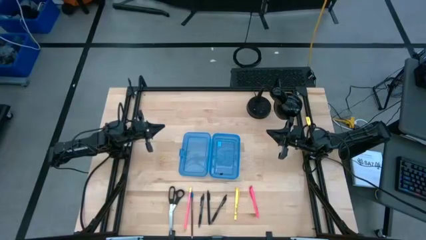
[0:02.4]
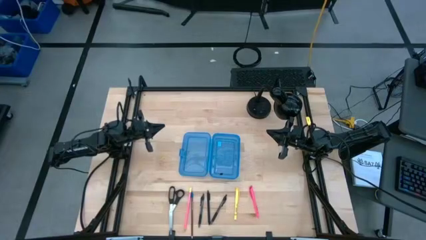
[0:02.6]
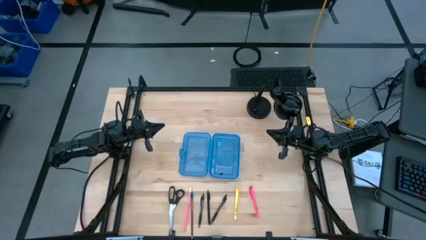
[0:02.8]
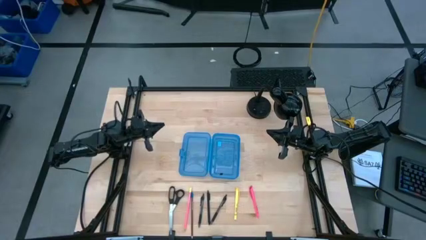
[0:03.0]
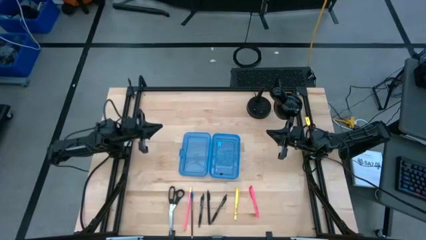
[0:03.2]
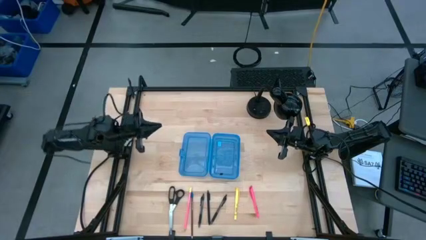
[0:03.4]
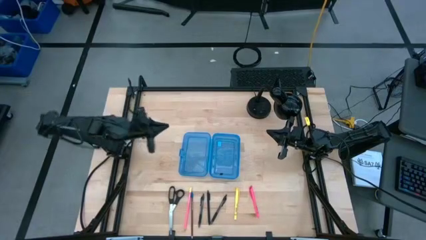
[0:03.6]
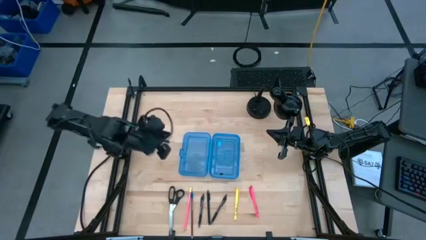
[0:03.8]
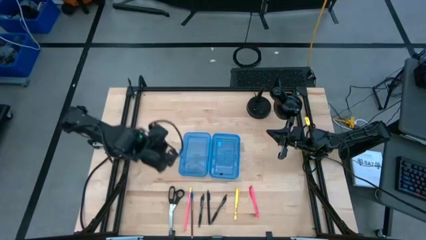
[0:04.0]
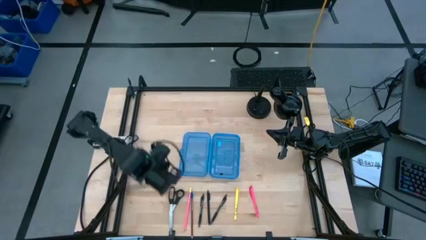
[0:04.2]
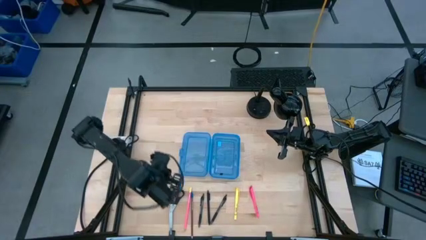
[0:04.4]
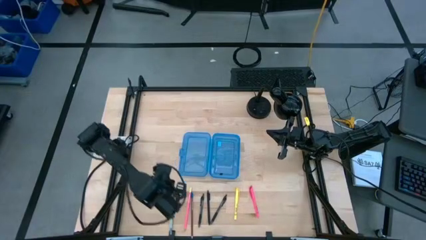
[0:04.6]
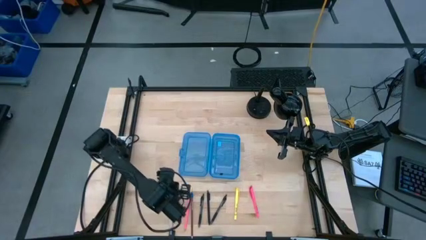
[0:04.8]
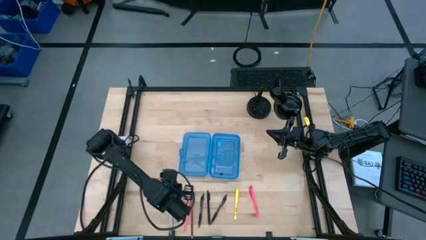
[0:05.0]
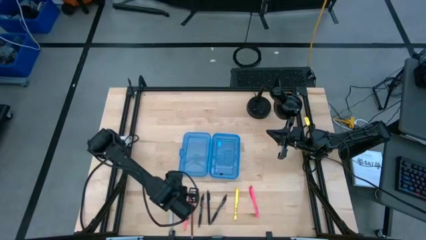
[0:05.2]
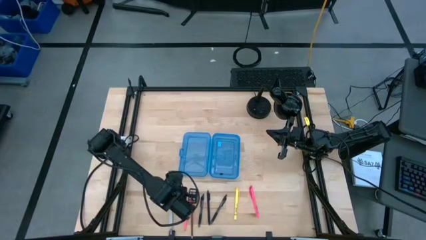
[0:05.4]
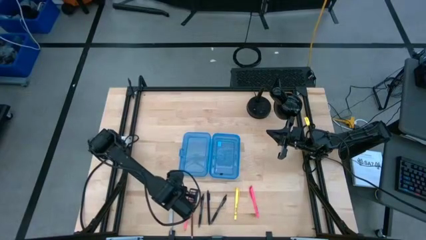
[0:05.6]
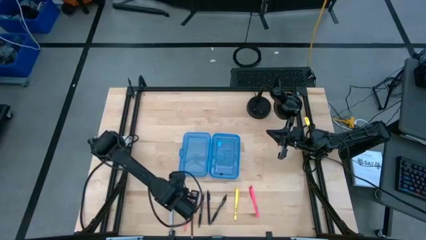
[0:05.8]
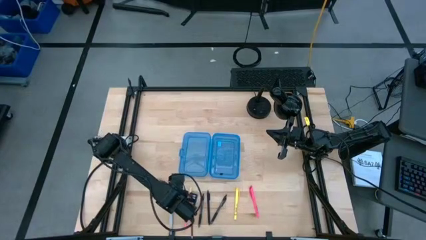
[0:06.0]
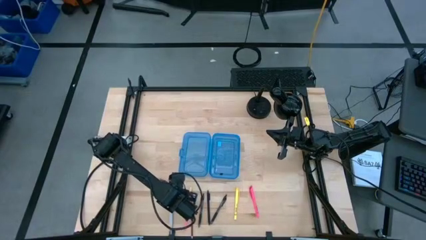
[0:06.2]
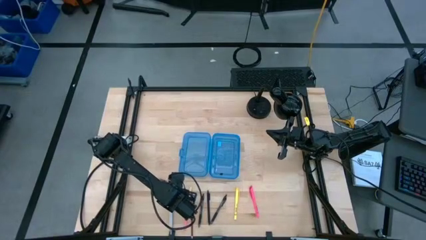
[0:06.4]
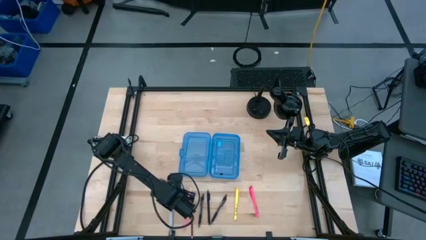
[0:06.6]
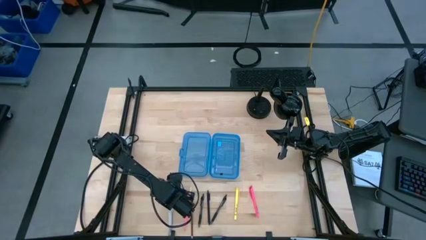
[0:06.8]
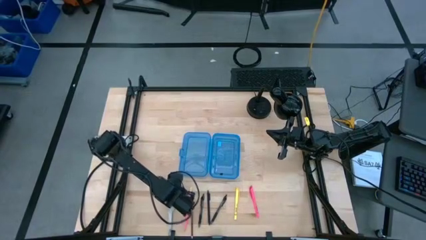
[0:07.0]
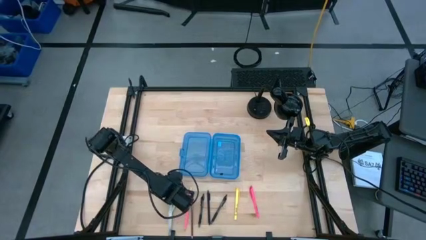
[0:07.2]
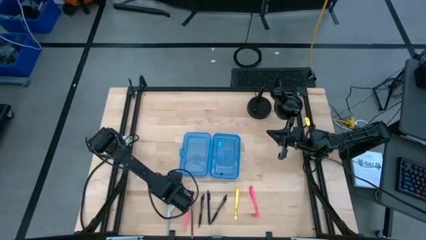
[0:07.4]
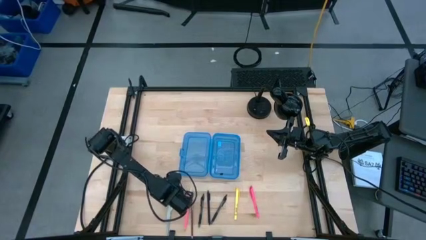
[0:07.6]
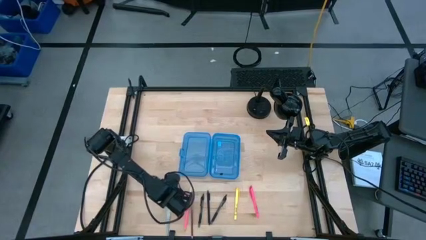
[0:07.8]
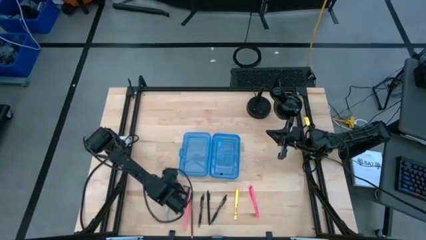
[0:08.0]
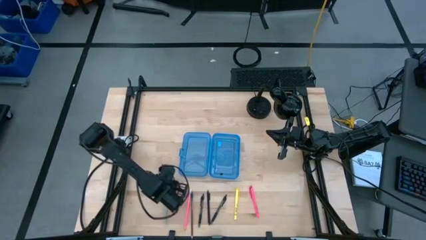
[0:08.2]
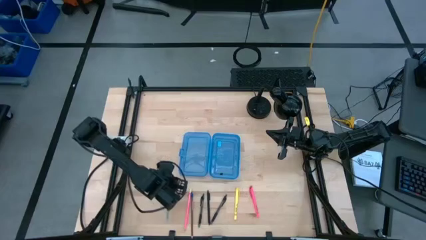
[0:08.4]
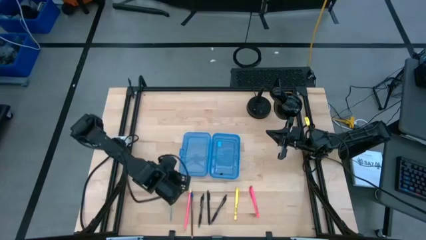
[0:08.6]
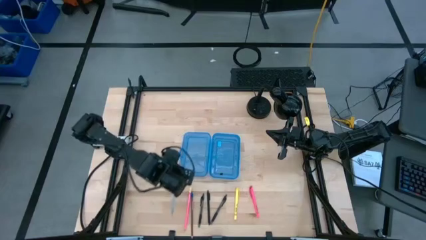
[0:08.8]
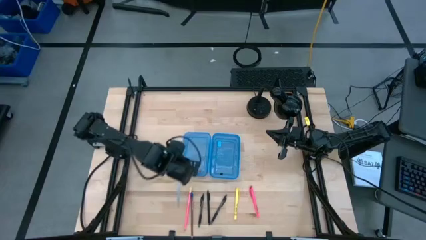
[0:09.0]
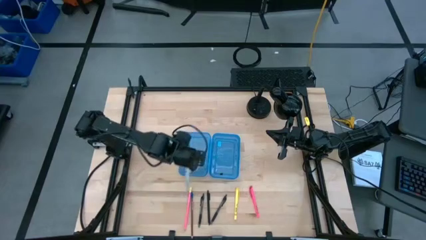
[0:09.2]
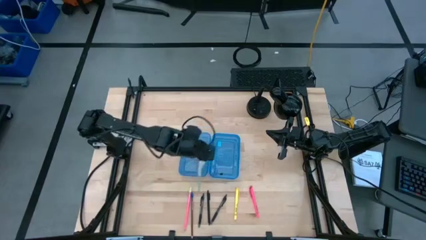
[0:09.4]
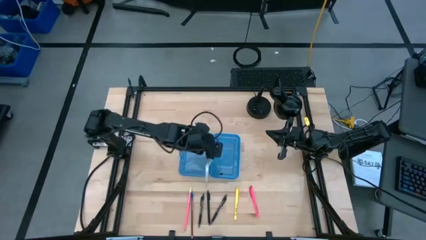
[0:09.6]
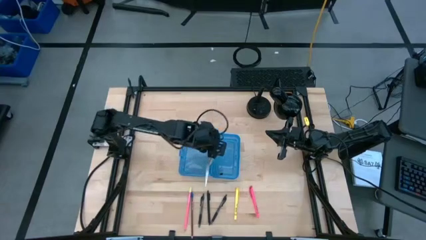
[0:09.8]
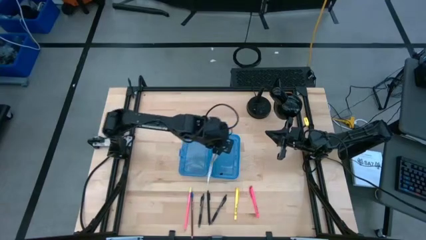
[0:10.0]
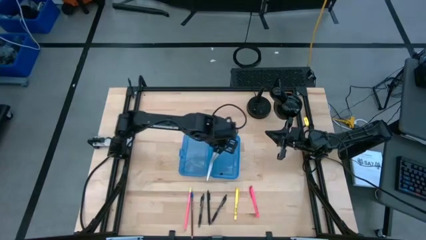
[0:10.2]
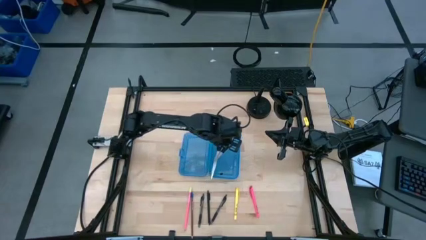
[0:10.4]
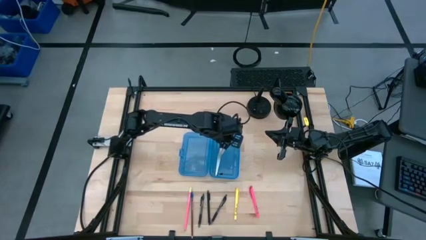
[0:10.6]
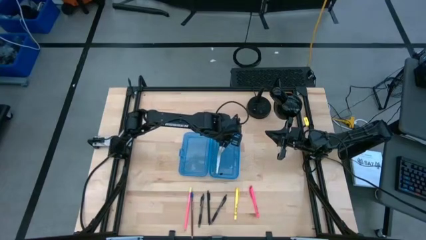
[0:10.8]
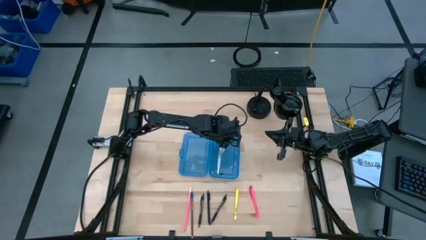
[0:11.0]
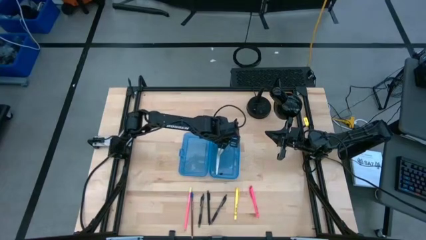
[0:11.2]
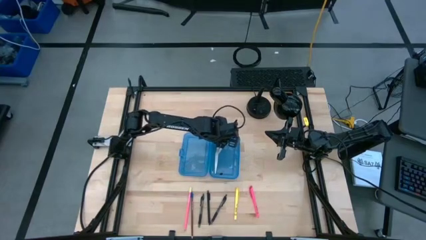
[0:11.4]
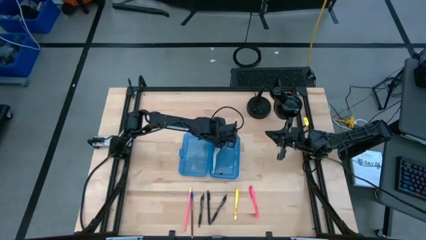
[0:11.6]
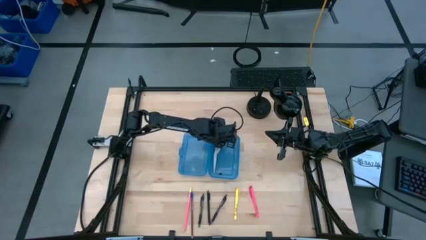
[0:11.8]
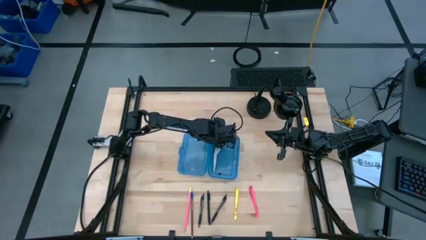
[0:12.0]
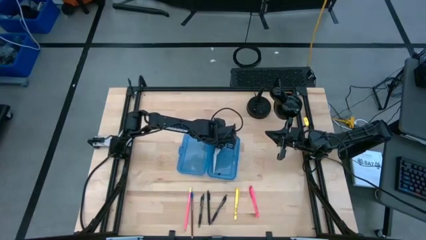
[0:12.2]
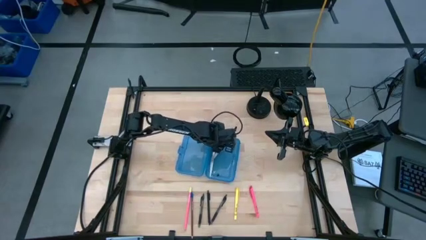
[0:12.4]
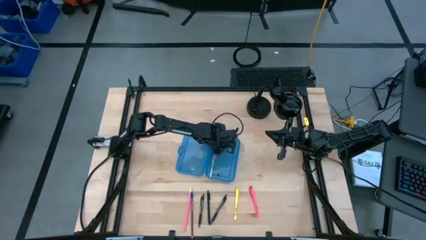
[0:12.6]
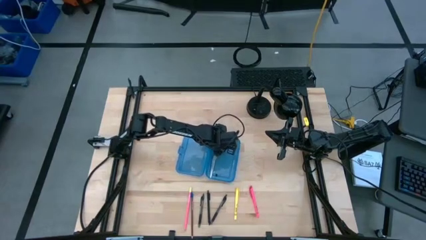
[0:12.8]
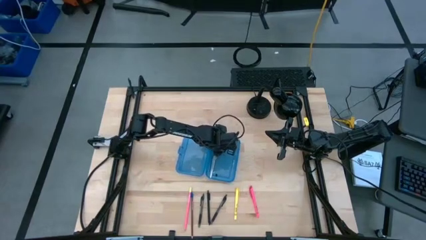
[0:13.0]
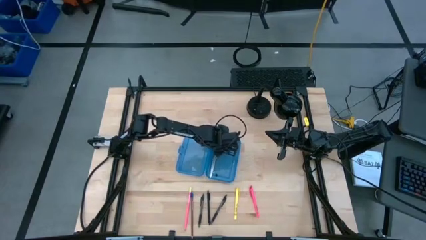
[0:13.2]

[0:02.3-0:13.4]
Task: Pick & place school supplies into a supply box
Put the black scissors into the blue supply box

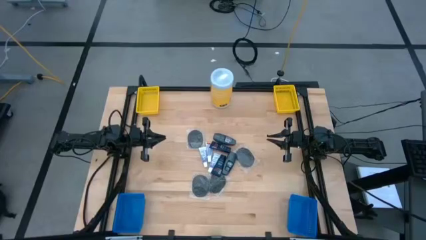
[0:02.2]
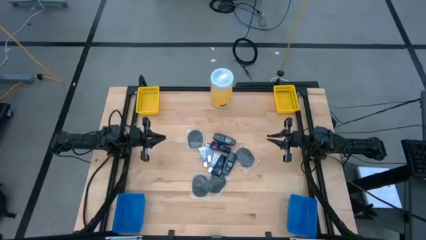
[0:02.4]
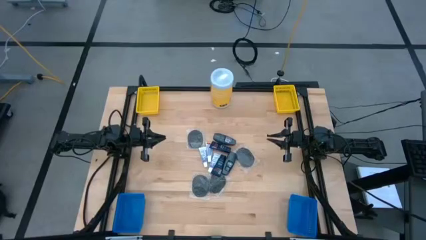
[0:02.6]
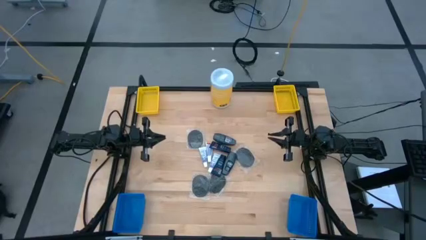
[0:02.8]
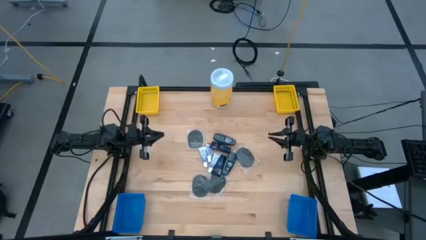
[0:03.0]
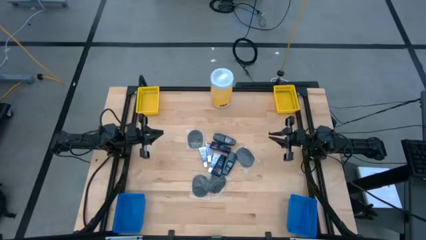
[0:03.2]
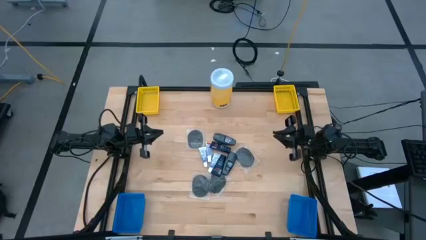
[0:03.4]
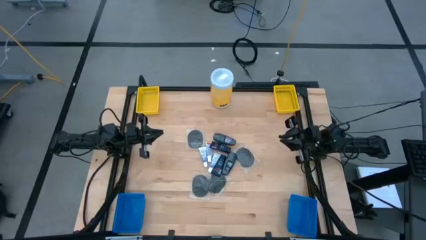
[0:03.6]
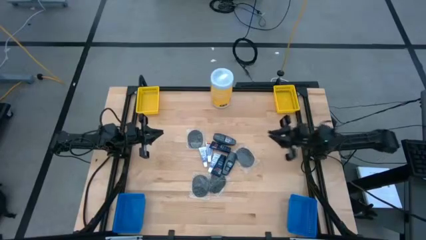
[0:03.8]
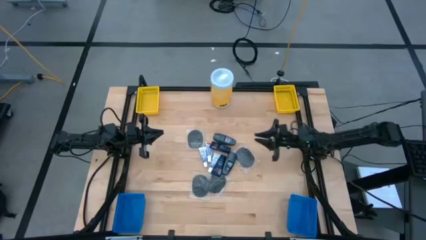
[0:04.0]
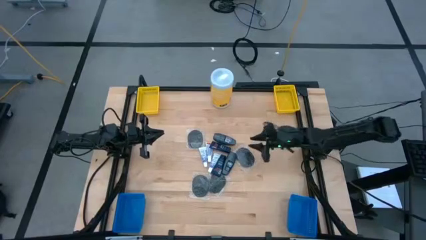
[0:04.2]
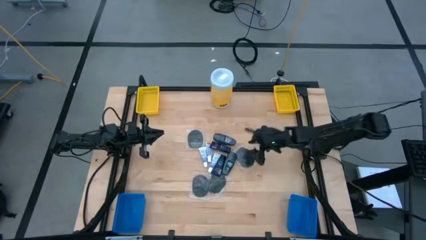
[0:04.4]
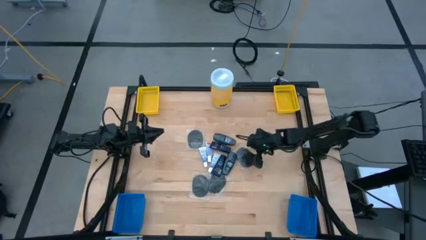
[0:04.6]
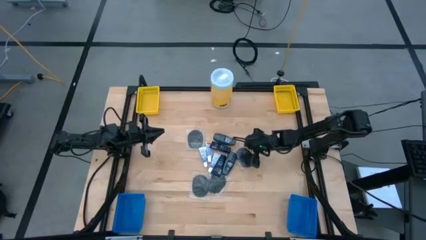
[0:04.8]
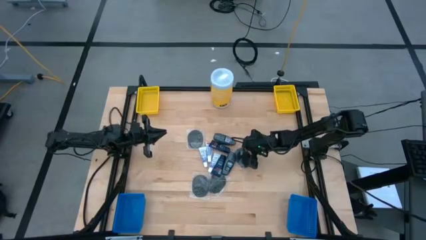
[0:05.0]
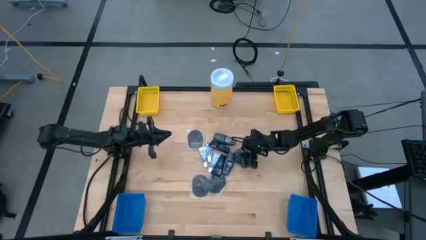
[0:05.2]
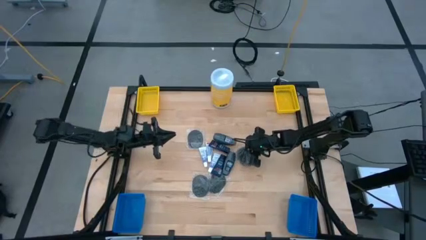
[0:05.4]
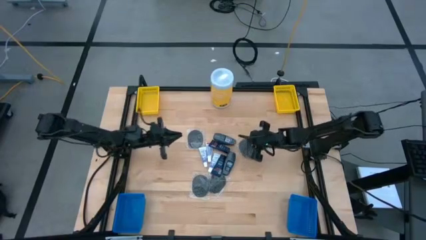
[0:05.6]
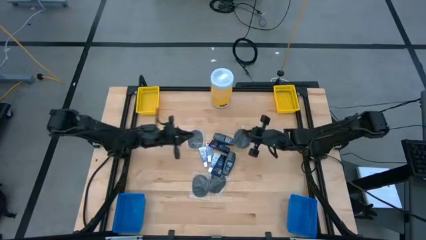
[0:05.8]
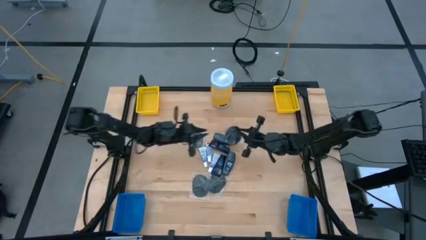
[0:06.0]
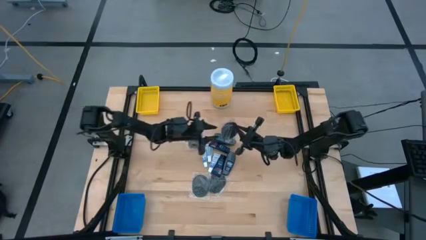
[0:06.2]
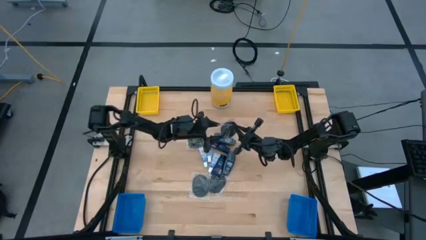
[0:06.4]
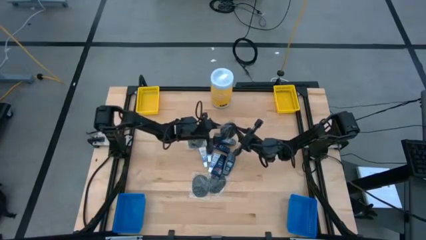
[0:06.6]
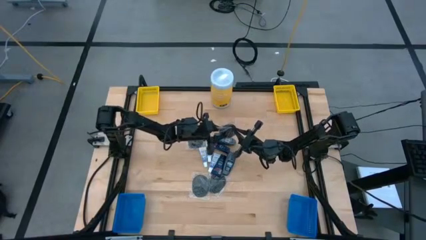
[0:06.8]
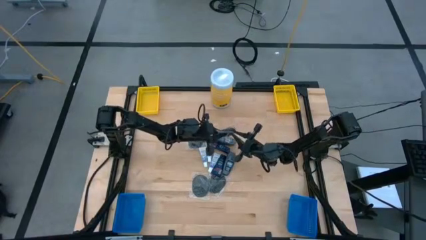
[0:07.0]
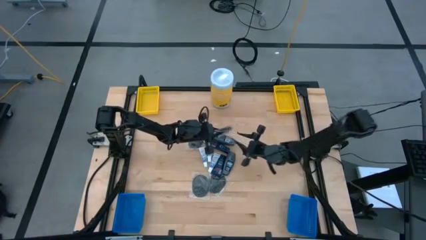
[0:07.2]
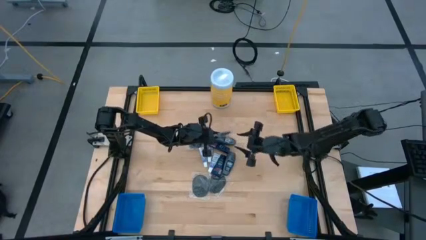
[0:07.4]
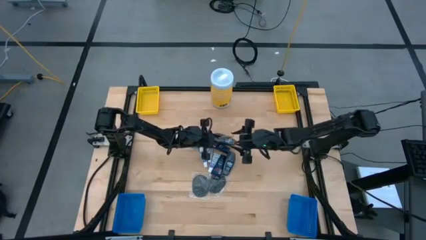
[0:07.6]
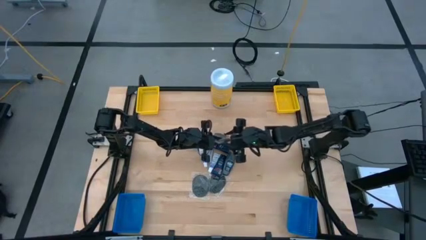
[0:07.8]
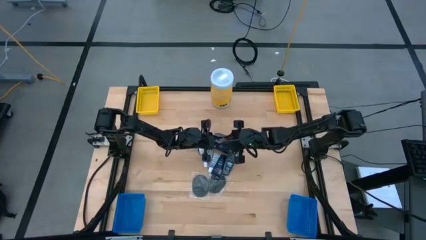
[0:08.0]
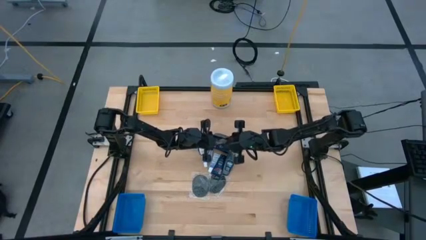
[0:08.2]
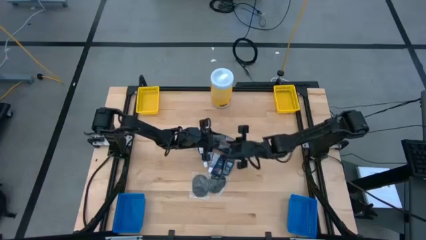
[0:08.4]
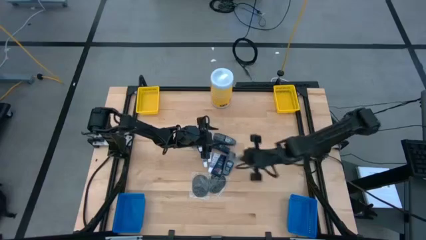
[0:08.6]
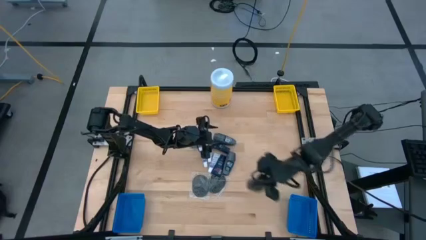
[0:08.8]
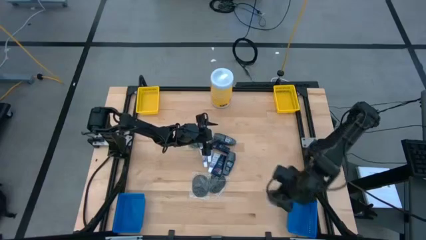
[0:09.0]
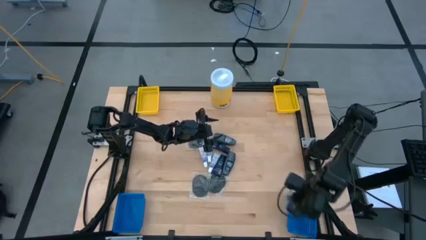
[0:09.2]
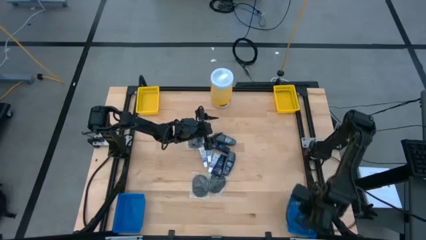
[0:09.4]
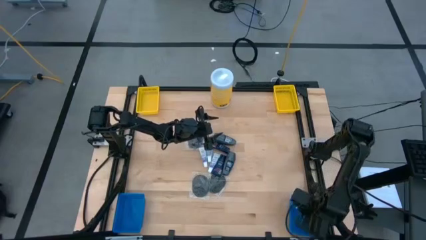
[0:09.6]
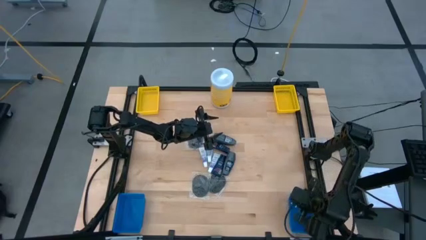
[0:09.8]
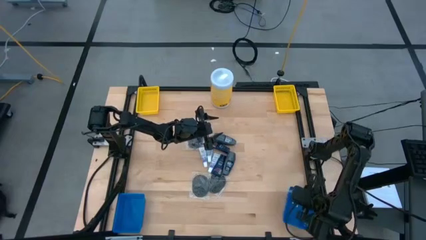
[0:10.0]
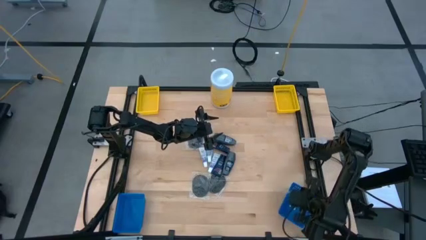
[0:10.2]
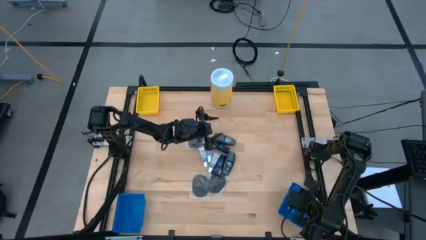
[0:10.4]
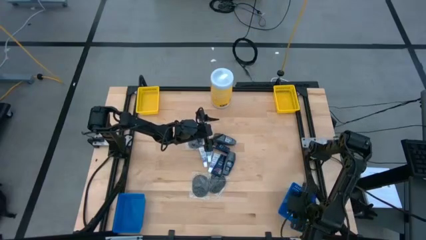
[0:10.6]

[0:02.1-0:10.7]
Task: Pick & Place Travel size toiletries
Put the black hairbrush into the right blue bin
